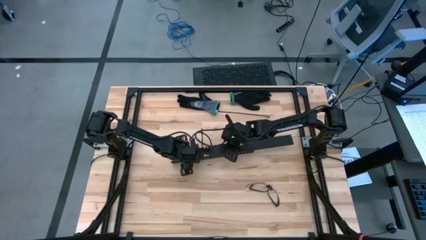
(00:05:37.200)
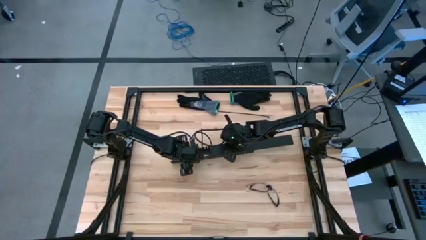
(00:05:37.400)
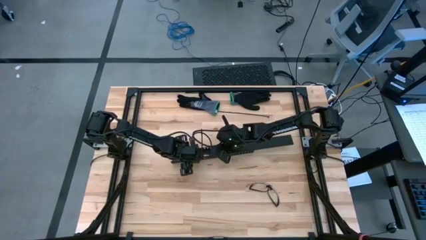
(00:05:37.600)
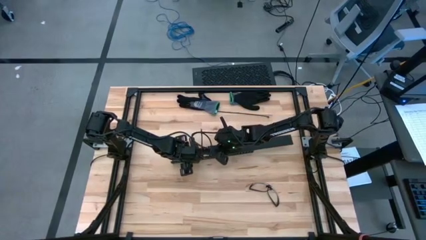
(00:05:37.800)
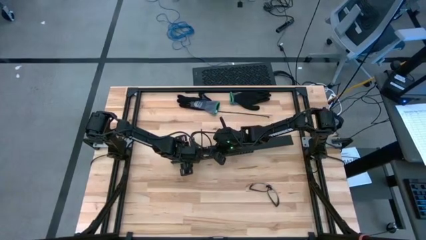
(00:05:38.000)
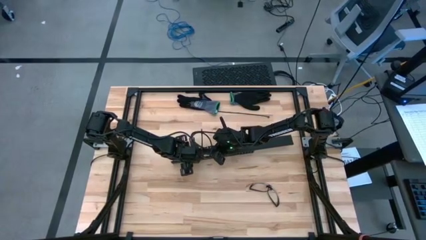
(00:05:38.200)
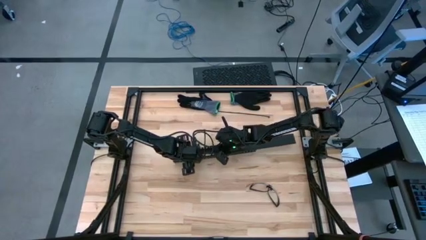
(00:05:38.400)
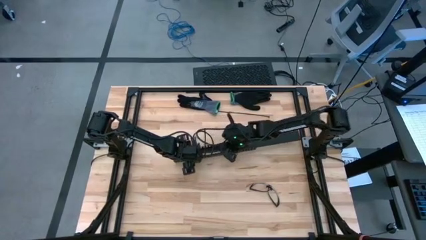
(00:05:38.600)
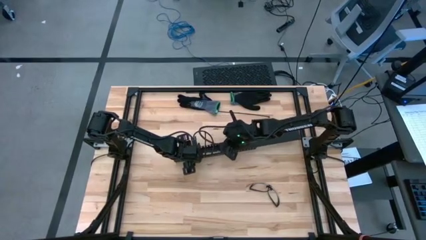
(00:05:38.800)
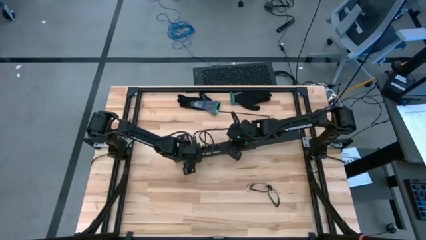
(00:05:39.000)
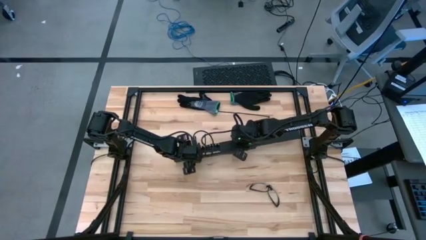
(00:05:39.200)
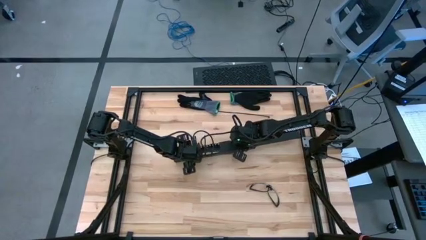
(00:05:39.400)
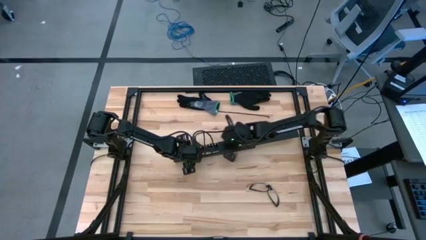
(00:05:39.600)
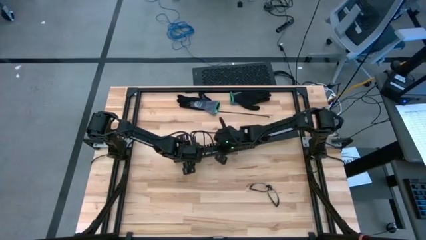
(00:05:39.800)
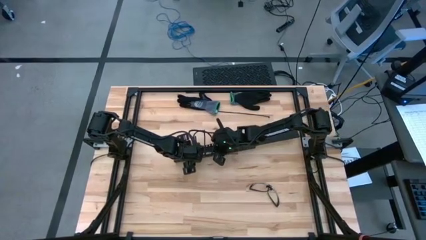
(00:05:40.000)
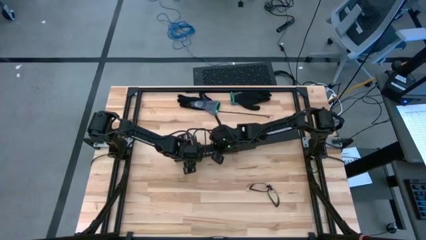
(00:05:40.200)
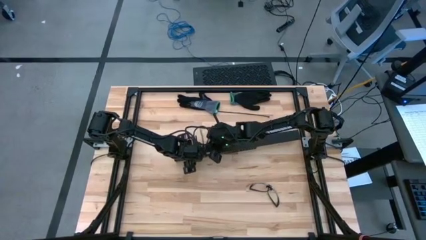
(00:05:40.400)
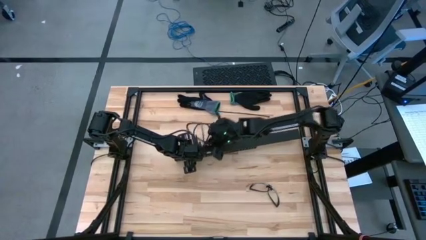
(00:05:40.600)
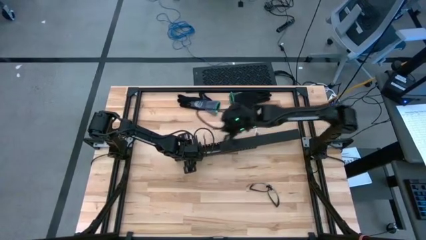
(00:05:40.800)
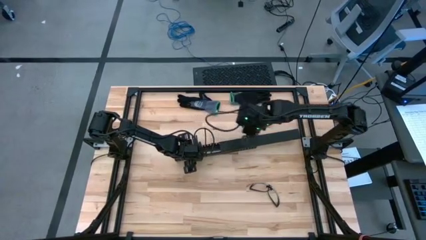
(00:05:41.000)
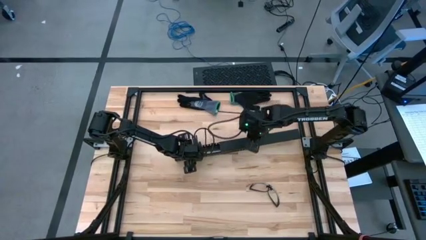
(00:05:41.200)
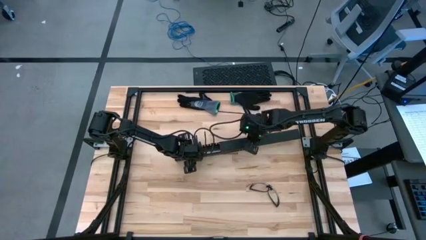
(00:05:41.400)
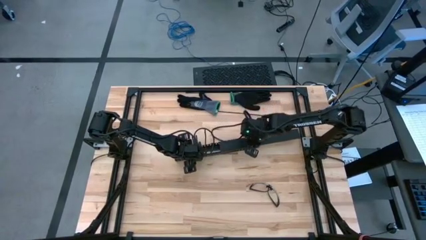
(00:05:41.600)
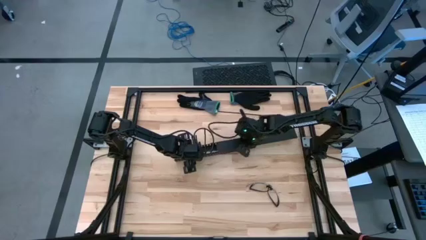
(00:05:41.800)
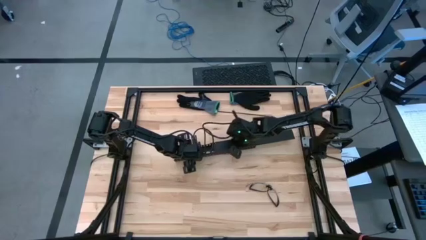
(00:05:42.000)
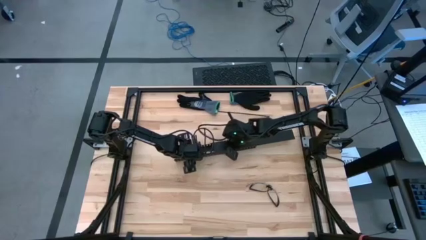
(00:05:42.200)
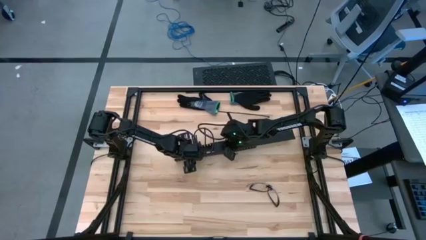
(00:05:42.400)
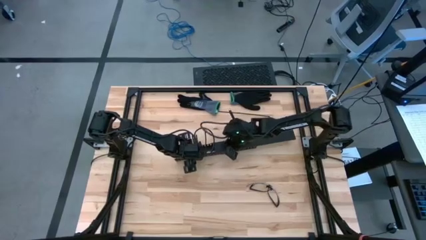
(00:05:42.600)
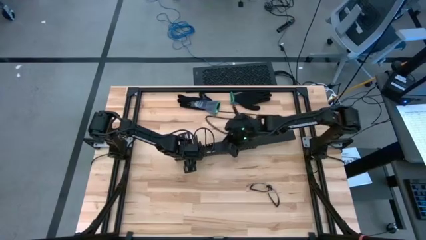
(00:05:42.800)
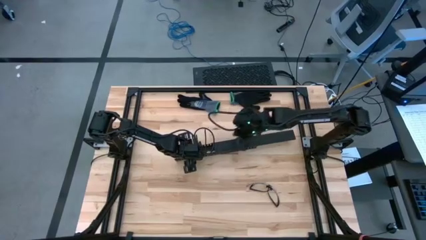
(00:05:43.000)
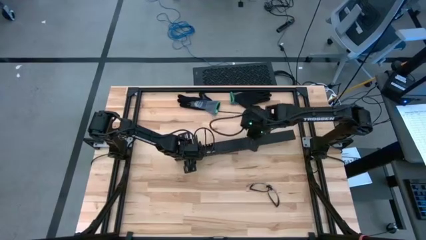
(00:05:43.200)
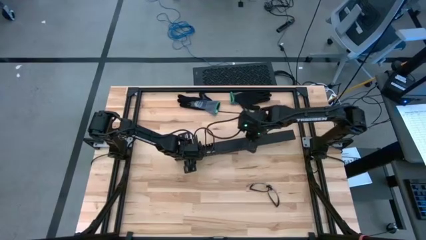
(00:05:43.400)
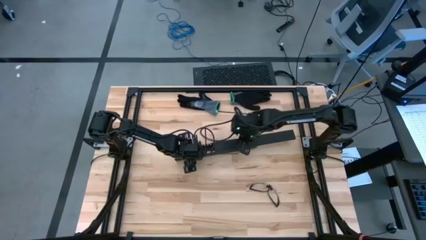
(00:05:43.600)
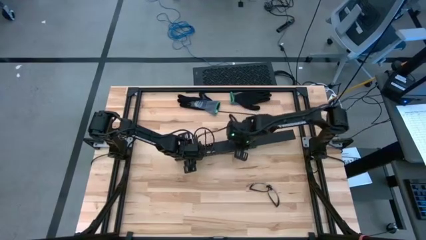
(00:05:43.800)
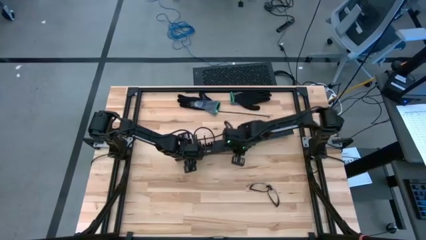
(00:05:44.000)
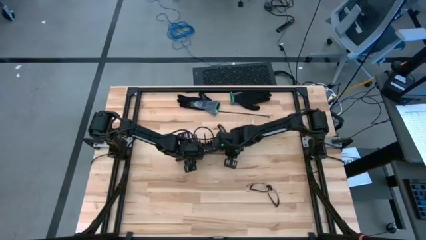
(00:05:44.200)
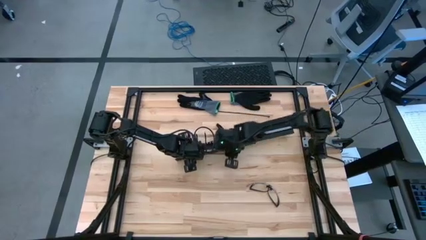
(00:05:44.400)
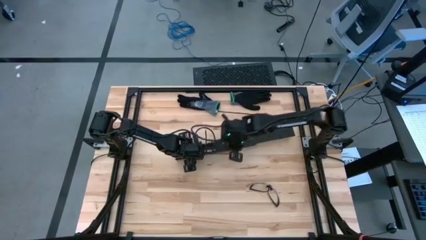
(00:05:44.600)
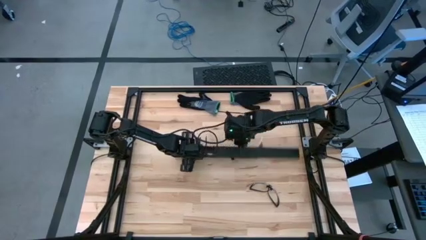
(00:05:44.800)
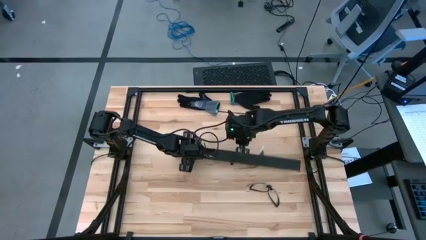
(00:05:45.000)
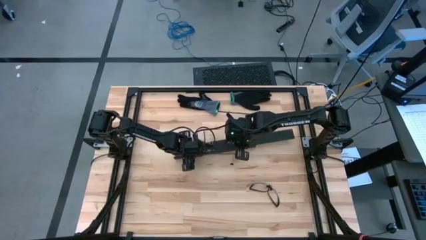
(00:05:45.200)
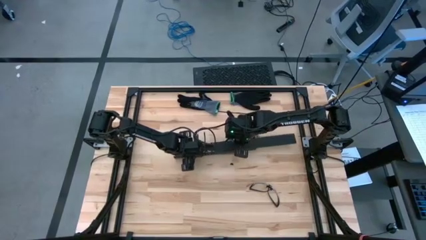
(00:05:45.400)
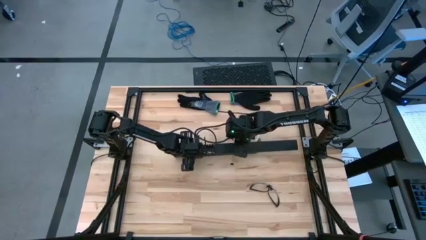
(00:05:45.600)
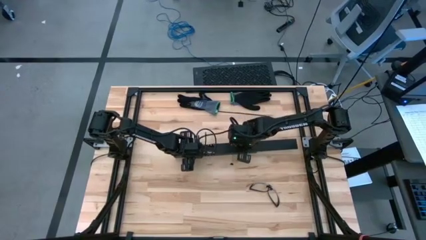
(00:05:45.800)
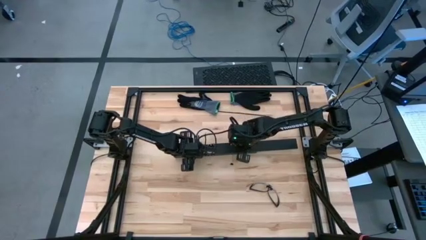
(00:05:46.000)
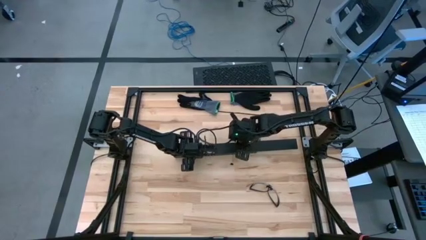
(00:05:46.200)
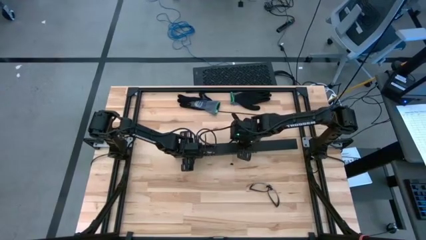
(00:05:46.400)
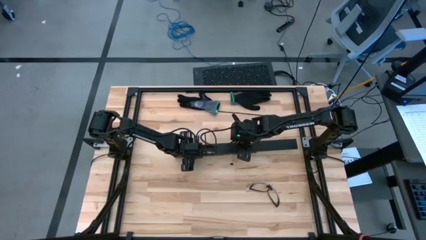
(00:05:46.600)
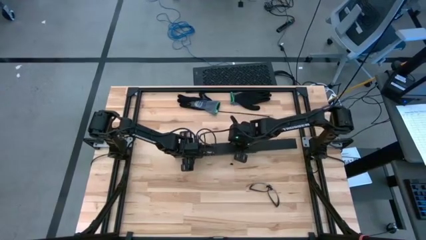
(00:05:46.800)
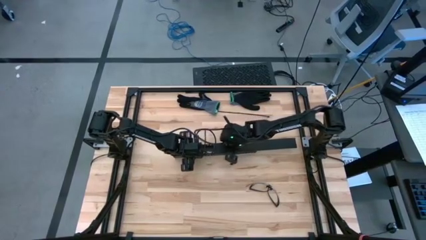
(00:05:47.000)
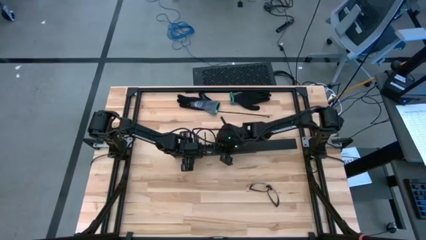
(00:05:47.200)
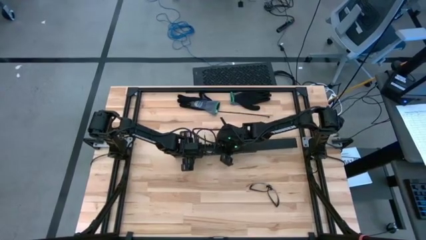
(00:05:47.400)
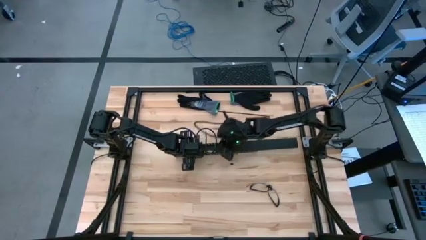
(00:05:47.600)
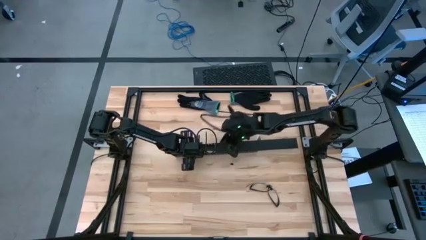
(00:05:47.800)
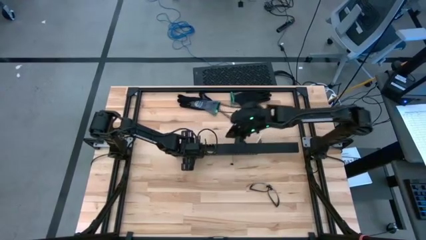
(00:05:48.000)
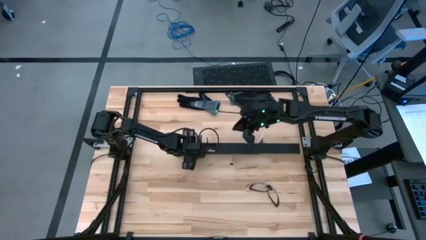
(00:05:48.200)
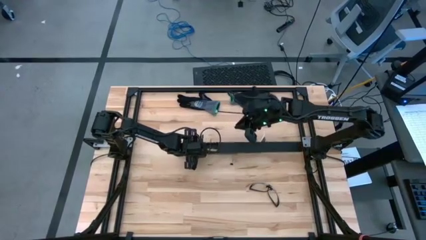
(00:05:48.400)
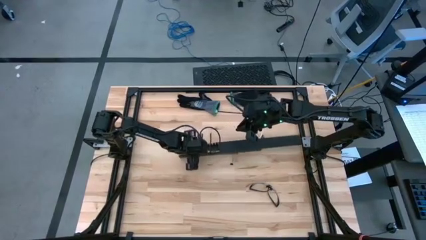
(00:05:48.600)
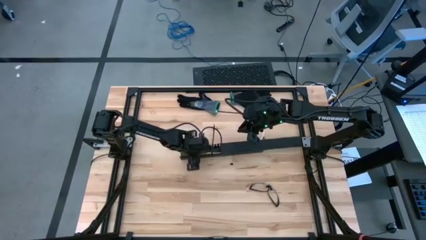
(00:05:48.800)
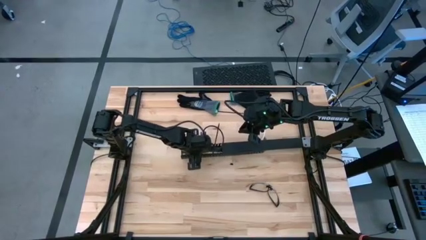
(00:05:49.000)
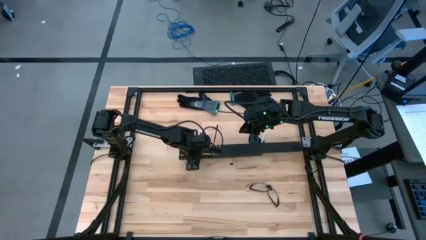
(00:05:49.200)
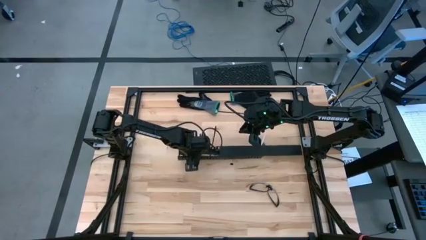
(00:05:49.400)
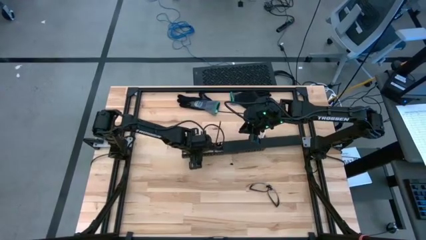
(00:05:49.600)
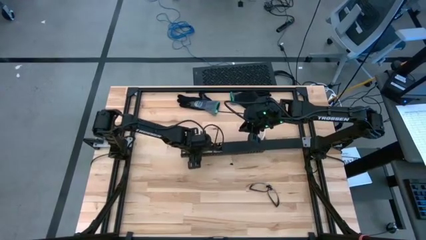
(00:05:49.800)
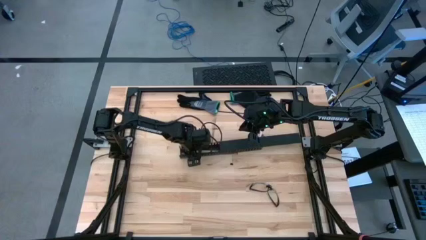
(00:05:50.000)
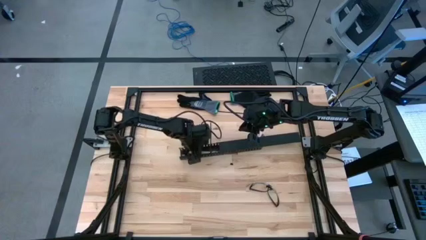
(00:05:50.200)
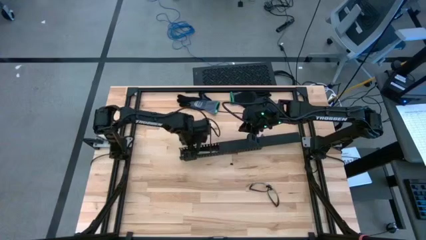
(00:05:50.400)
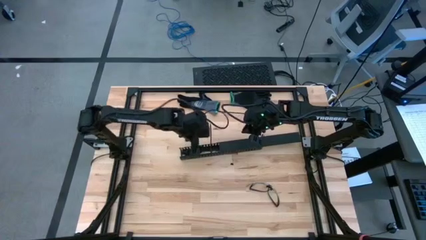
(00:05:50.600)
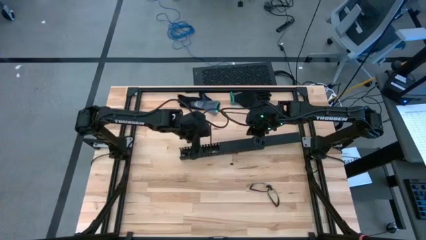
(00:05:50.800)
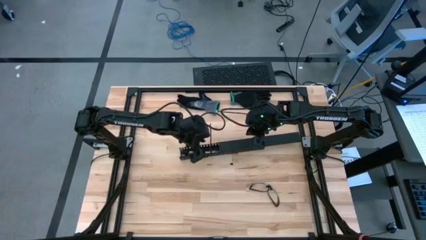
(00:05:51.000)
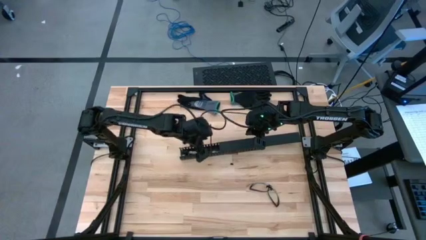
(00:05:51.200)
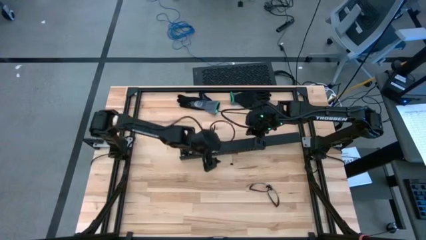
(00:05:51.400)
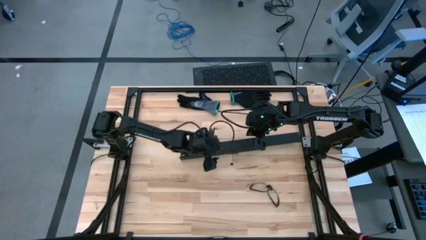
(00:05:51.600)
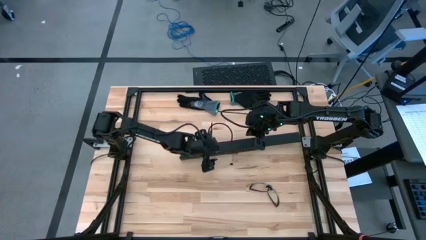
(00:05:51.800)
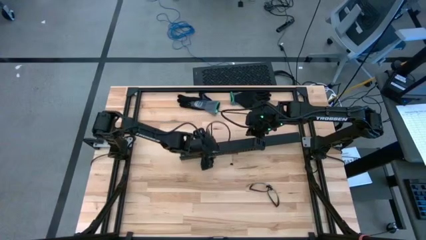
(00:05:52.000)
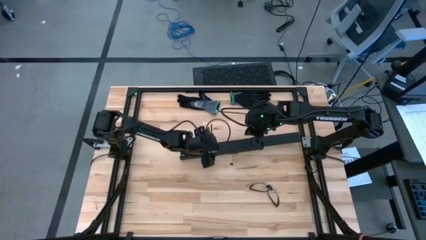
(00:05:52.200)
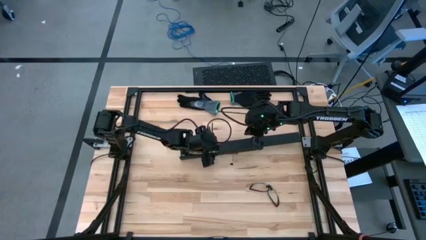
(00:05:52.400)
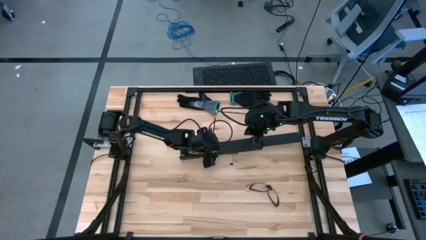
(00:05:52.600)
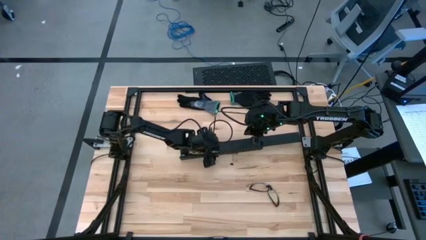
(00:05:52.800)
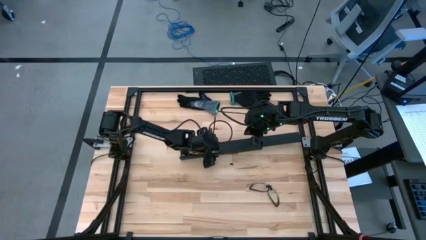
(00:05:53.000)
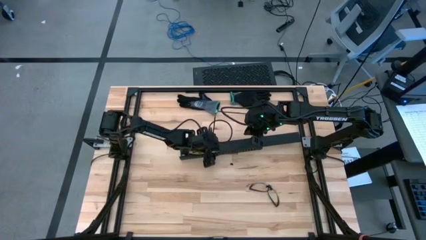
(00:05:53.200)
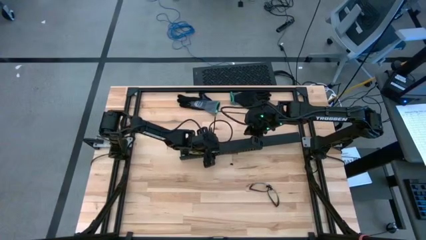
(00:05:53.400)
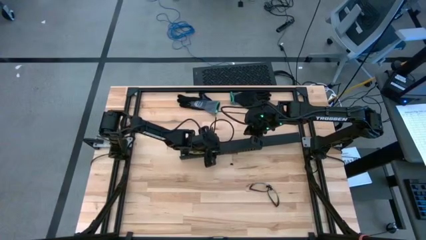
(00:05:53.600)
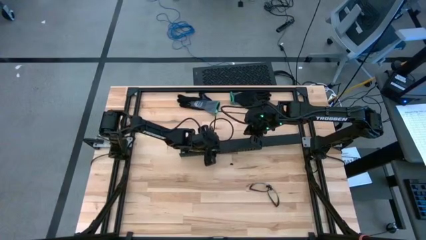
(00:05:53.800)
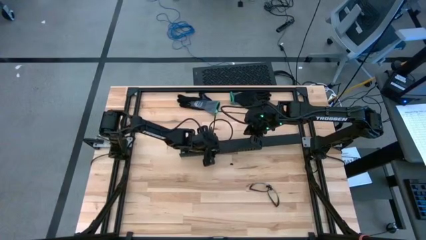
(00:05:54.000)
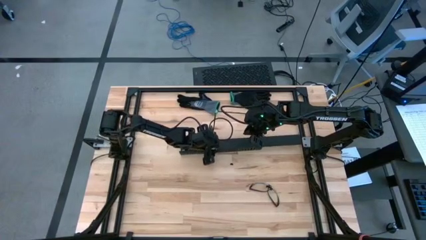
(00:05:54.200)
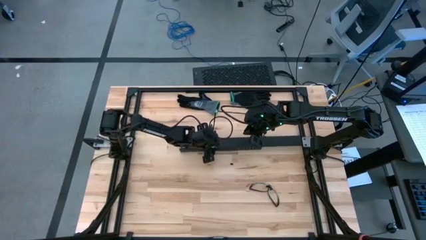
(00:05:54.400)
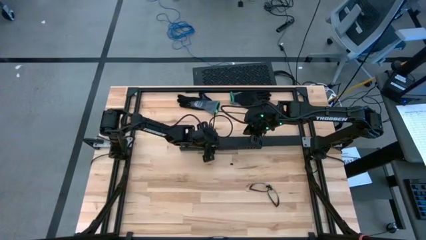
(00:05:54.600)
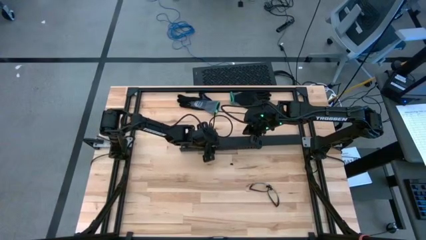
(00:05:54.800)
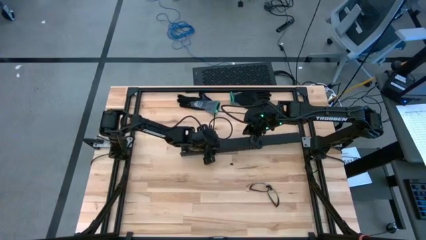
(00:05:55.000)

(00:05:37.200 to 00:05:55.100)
Task: Ziptie cables
Close the black cable duct
